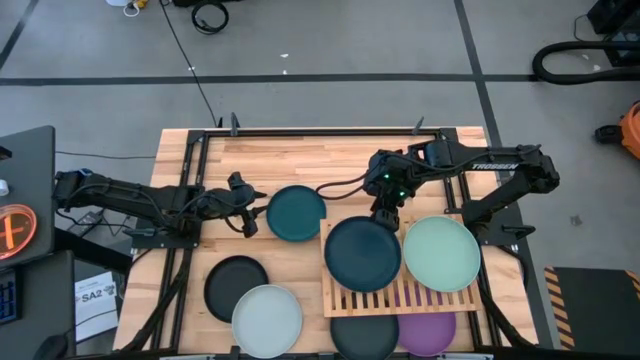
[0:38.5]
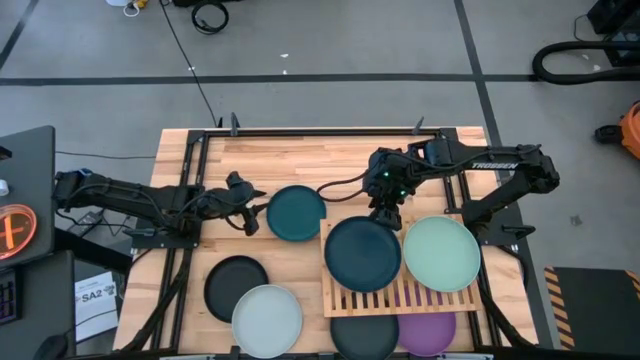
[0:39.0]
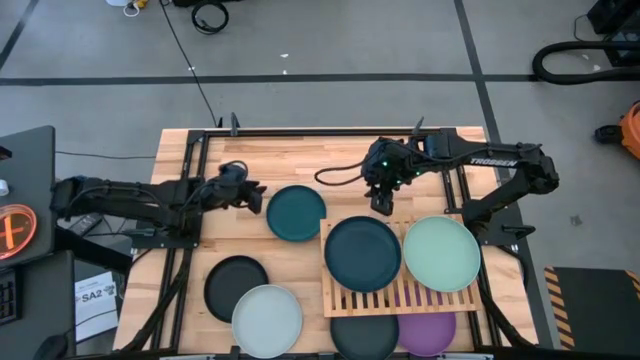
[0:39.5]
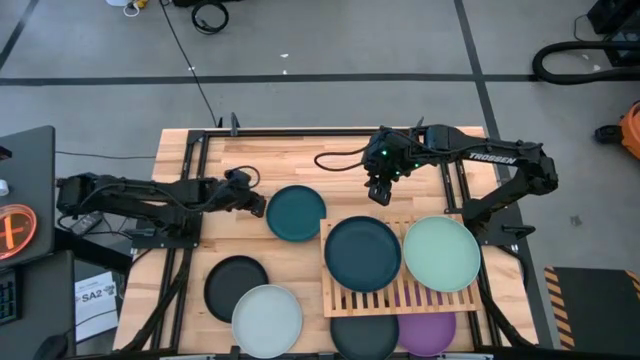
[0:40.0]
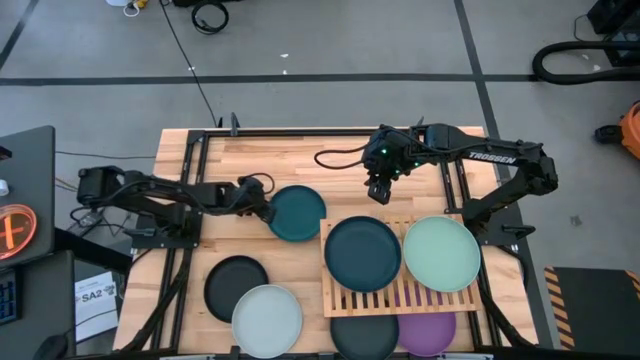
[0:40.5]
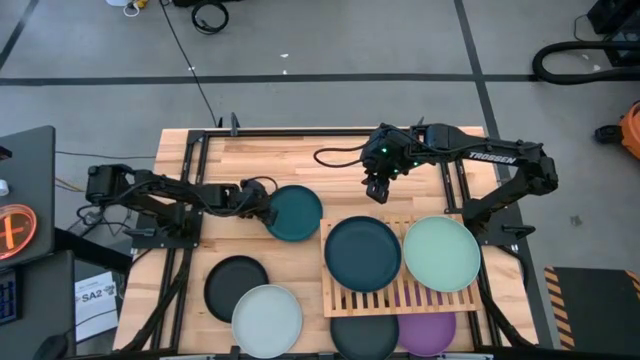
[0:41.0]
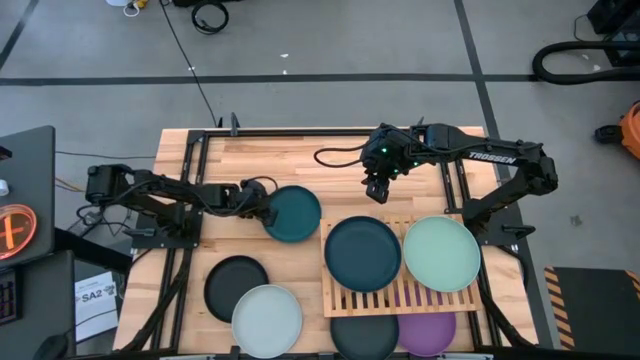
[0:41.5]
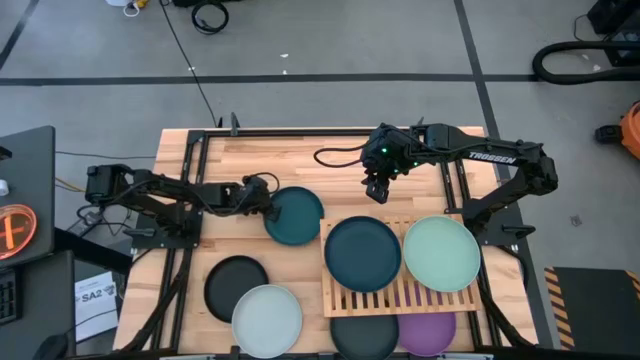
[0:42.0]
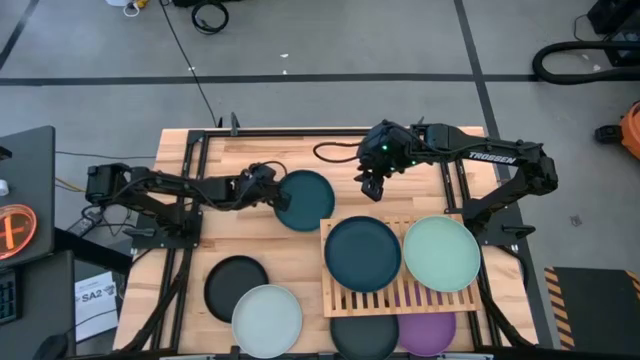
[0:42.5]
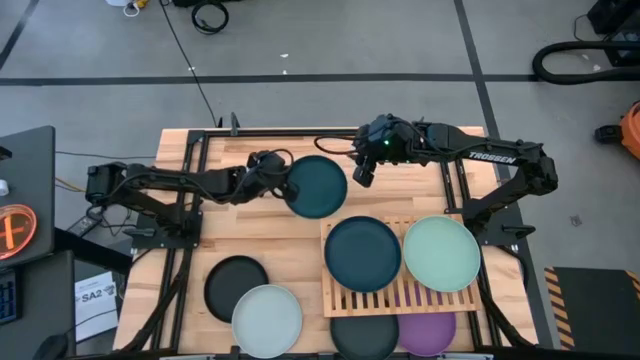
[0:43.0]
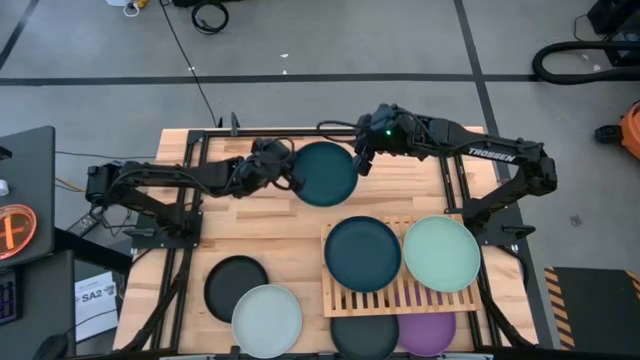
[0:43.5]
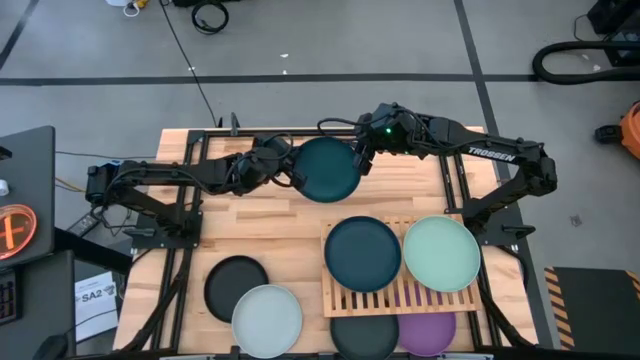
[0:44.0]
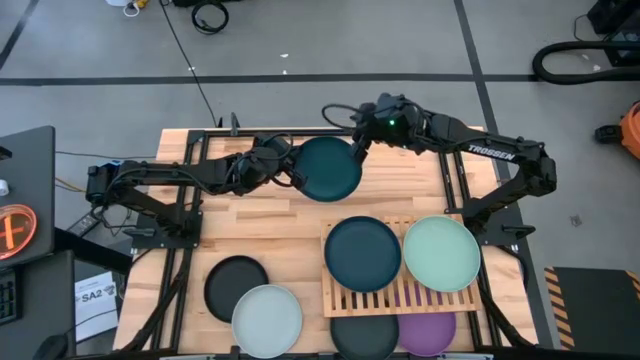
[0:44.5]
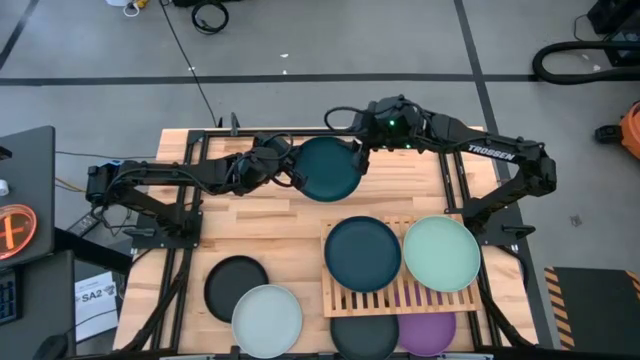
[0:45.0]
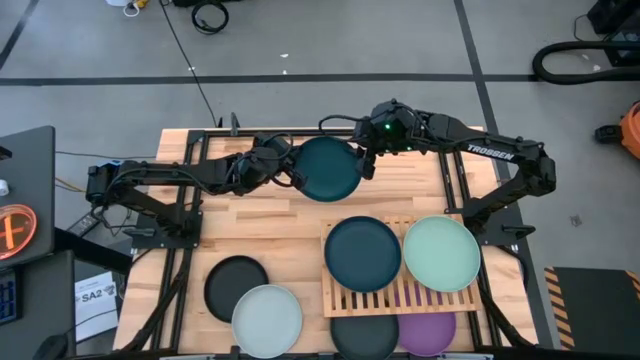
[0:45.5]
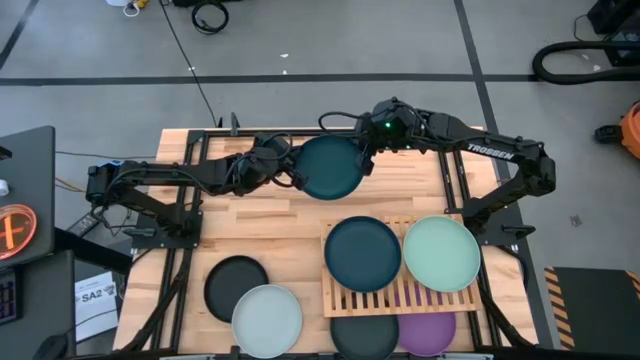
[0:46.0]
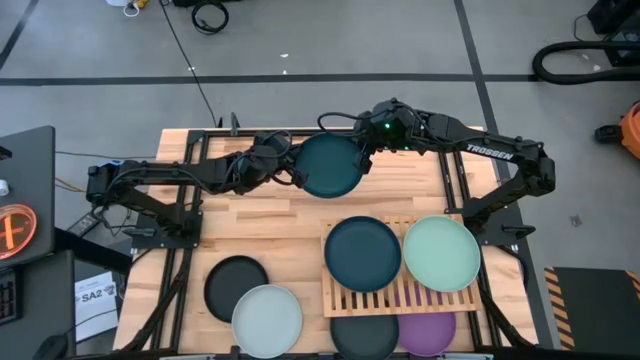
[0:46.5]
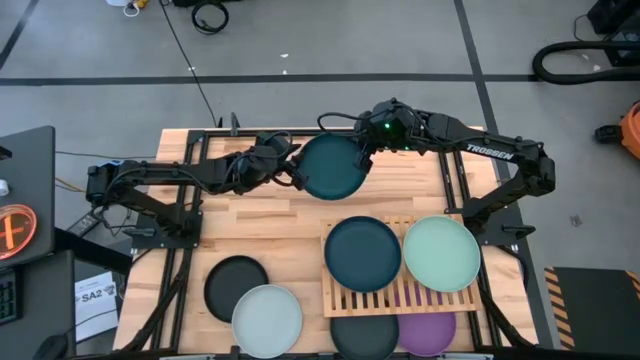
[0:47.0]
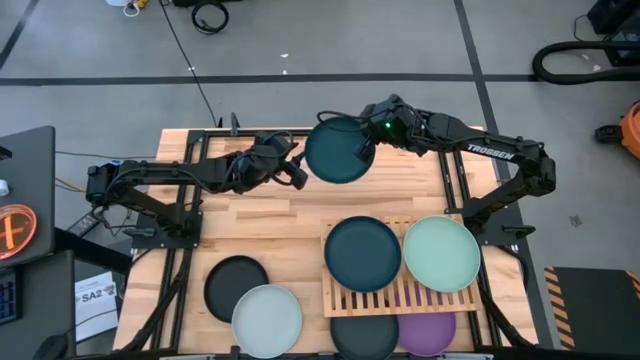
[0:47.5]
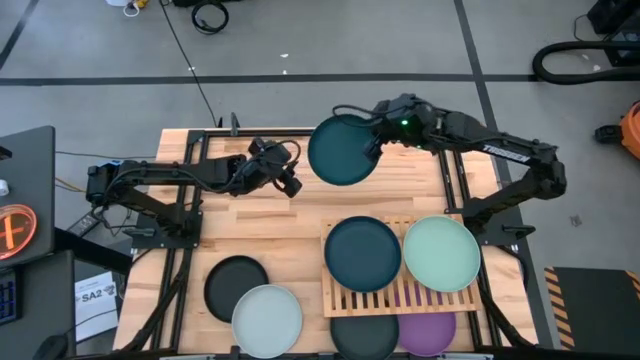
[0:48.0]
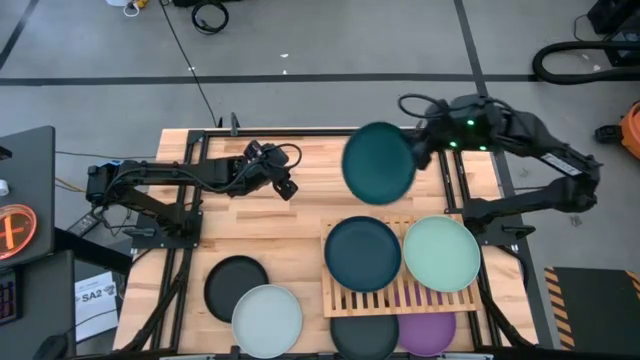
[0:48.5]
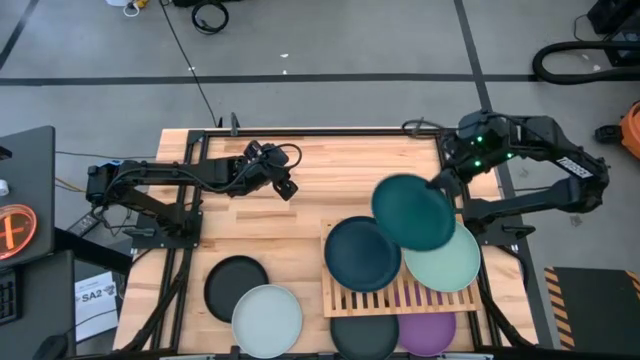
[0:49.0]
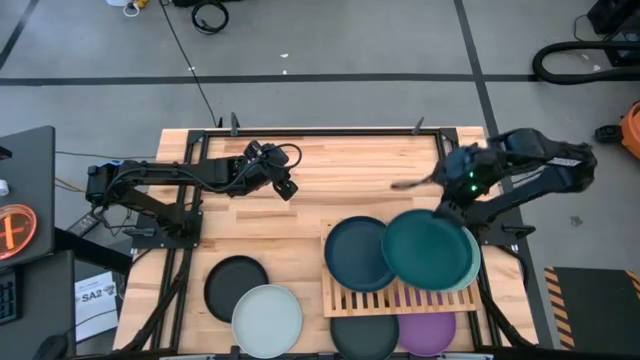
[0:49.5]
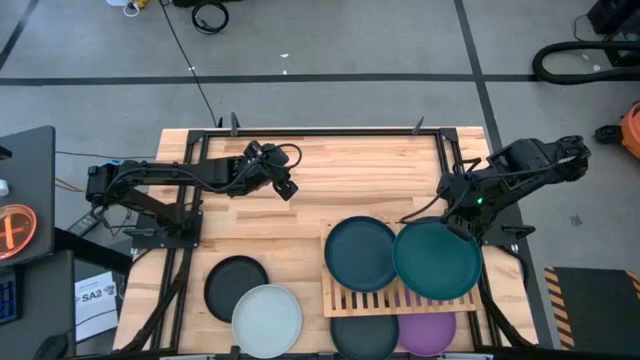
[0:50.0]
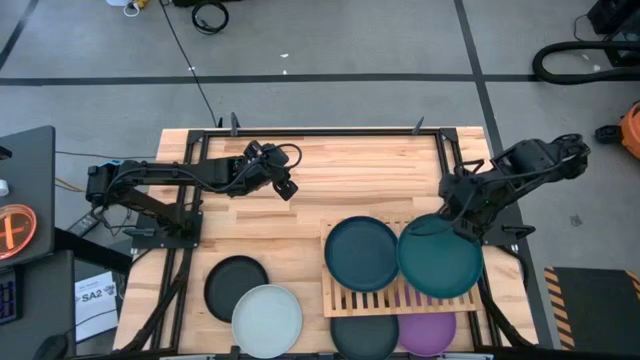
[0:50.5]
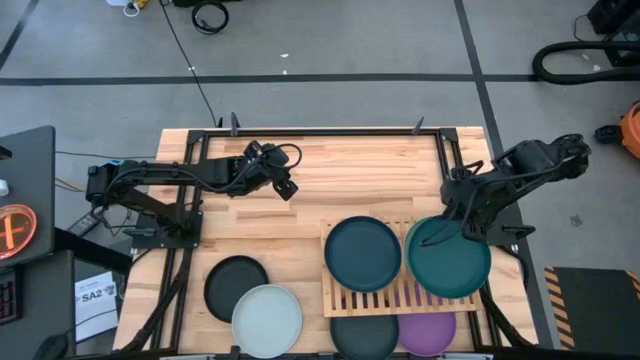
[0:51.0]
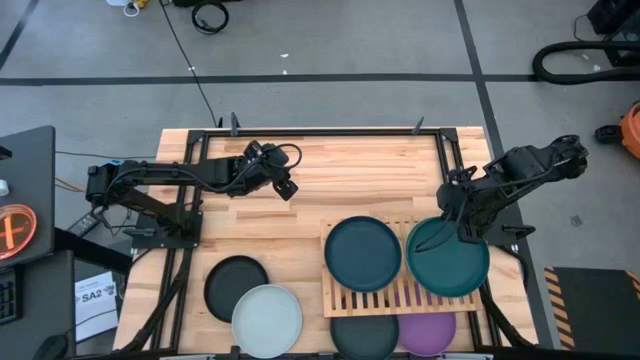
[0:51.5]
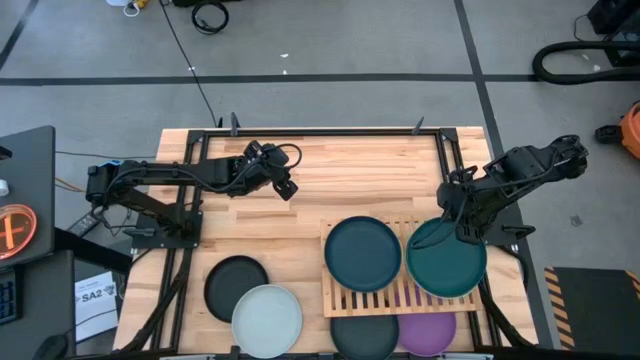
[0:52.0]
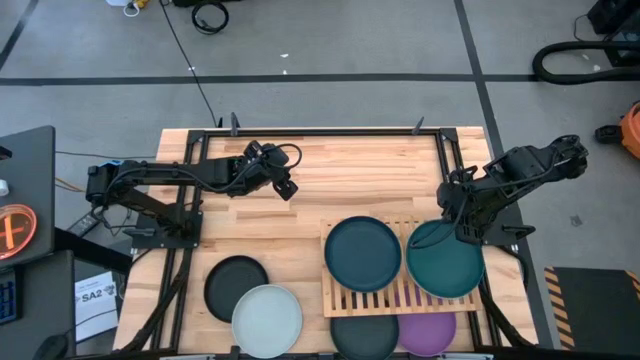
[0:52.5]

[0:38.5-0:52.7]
Task: Place and stack plates onto a shelf
Stack the dark green plate on top of the light green plate

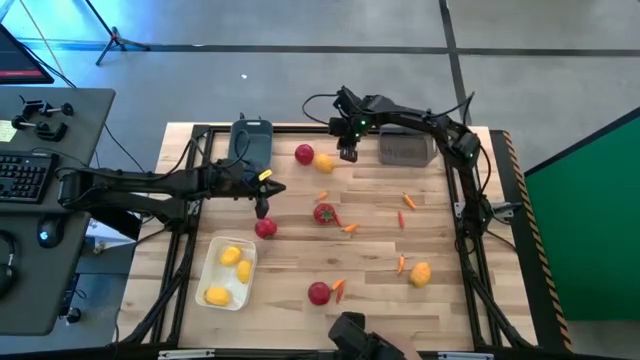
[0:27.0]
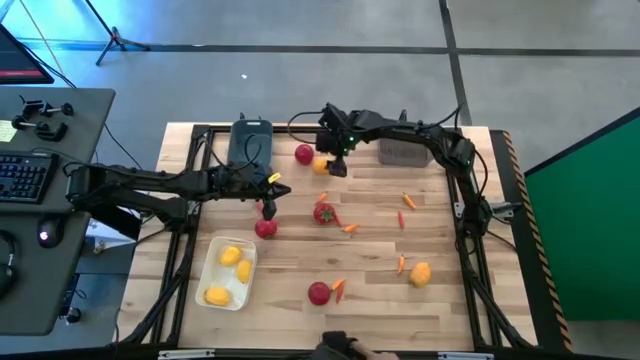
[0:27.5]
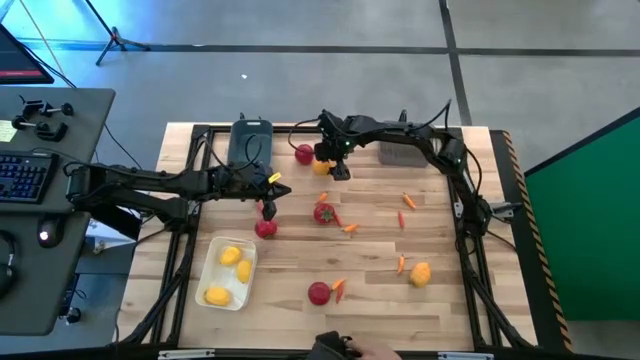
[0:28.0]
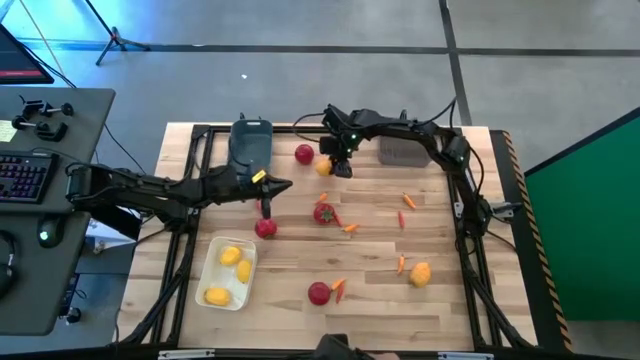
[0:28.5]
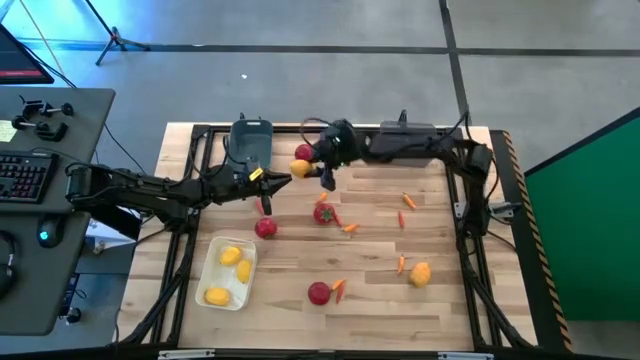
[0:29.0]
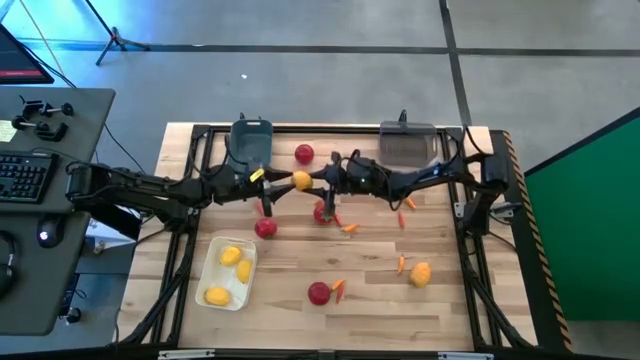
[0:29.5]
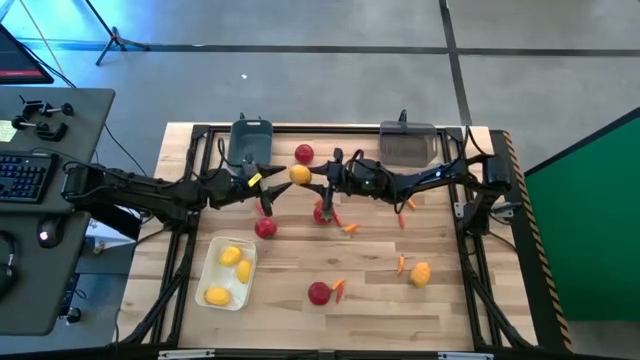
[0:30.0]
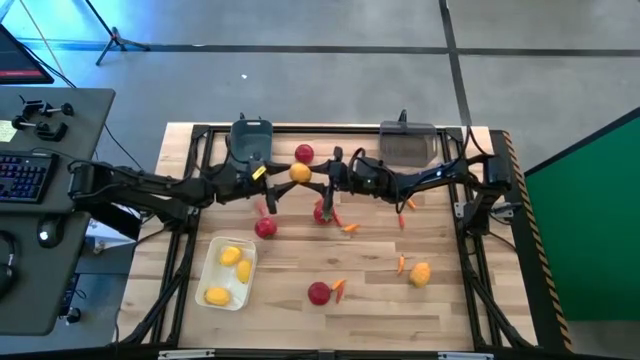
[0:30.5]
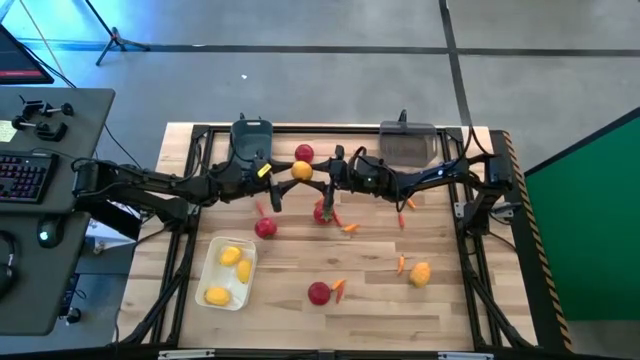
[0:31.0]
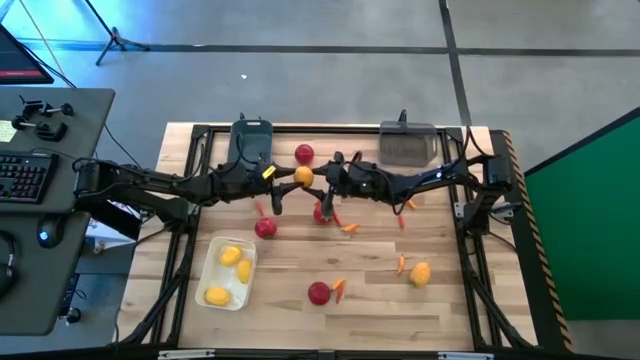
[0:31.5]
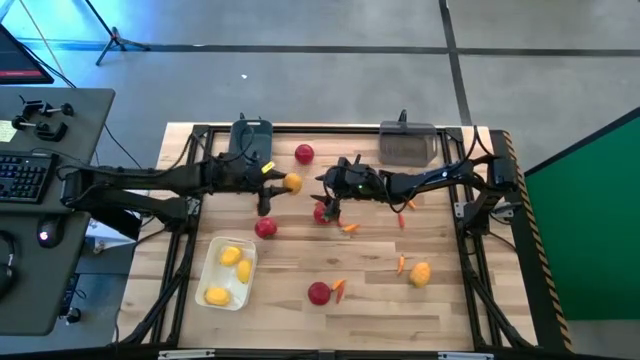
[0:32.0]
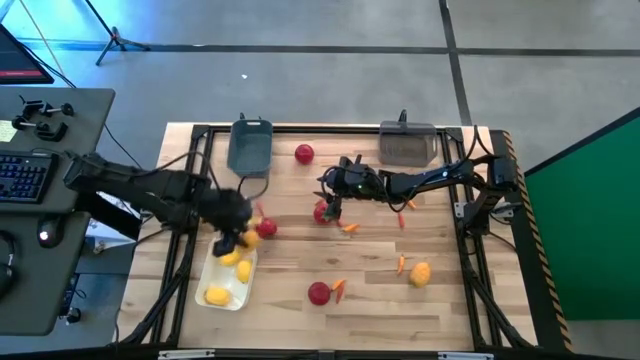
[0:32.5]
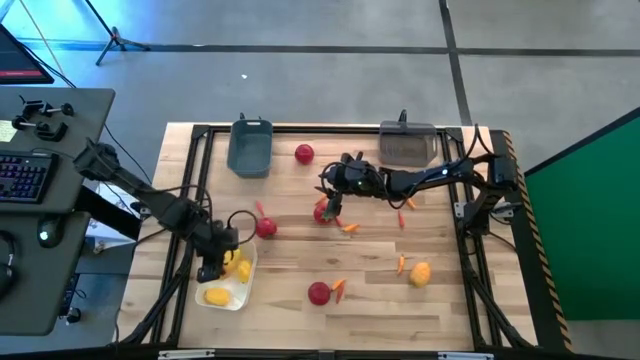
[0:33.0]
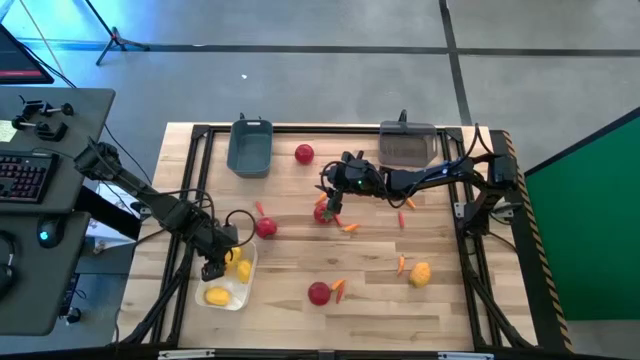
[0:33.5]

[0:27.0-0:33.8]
Task: Sort produce into baskets
Put the yellow lemon into the white bin
